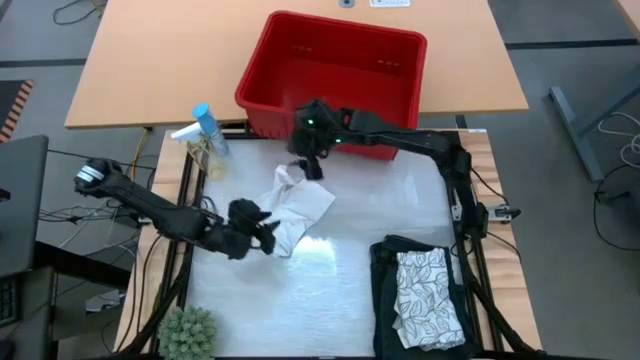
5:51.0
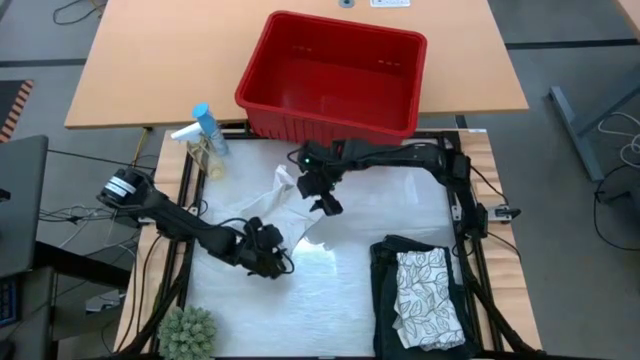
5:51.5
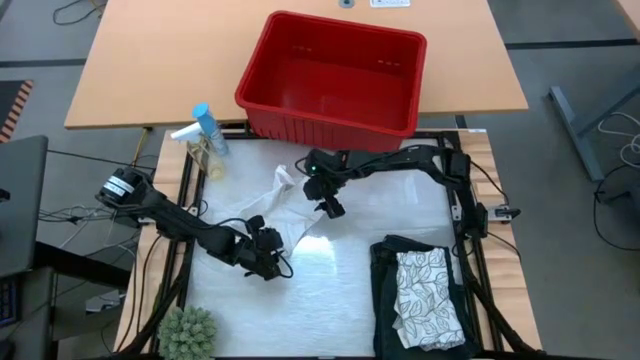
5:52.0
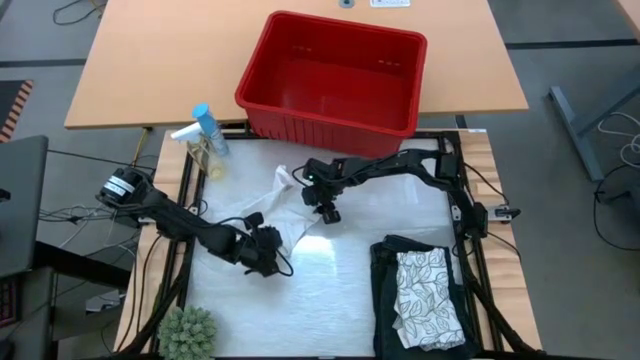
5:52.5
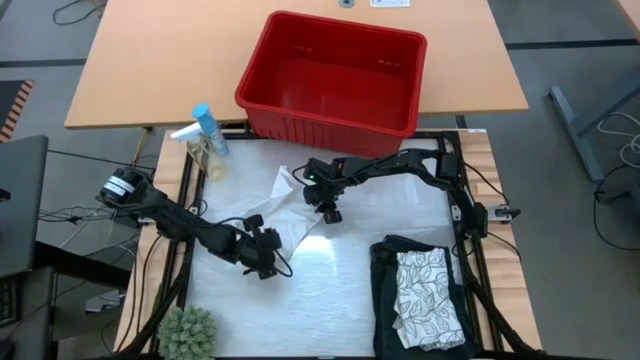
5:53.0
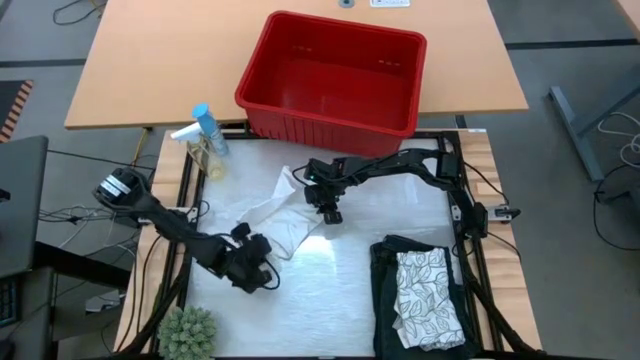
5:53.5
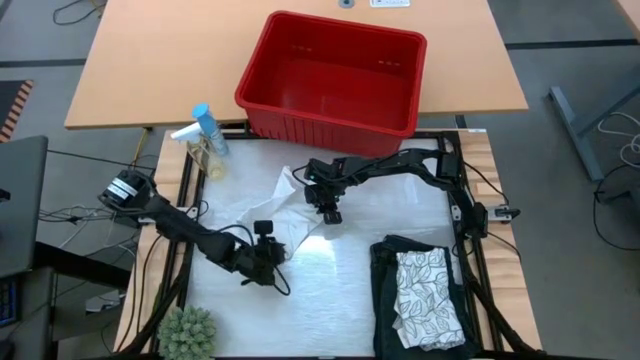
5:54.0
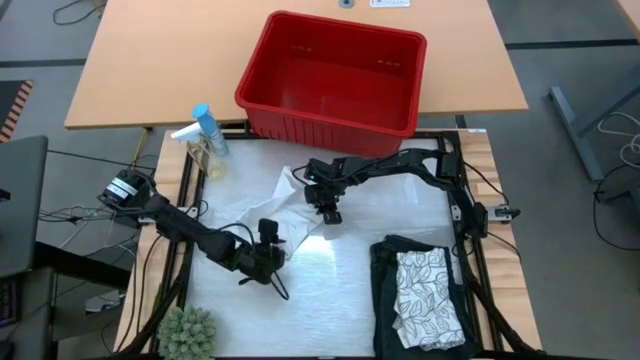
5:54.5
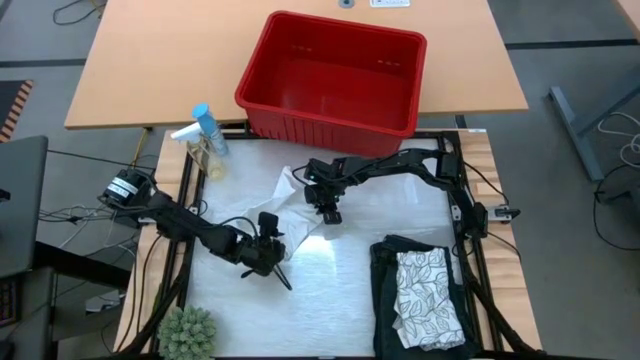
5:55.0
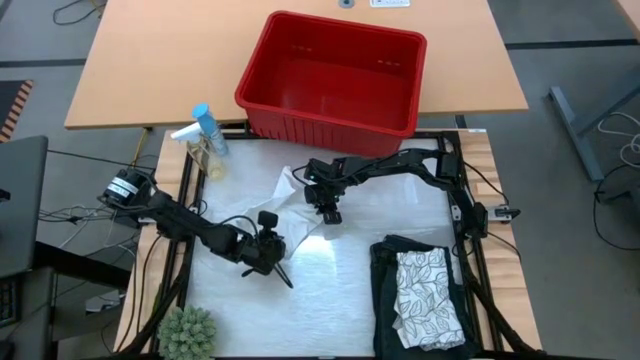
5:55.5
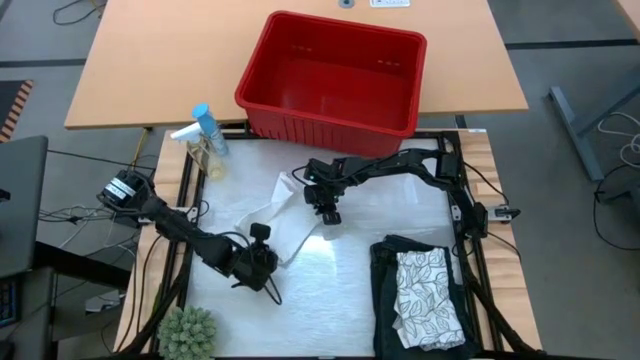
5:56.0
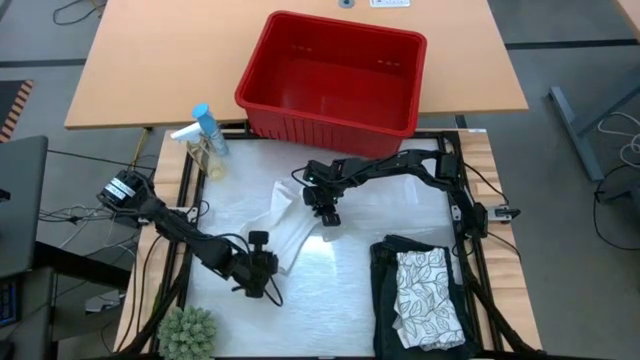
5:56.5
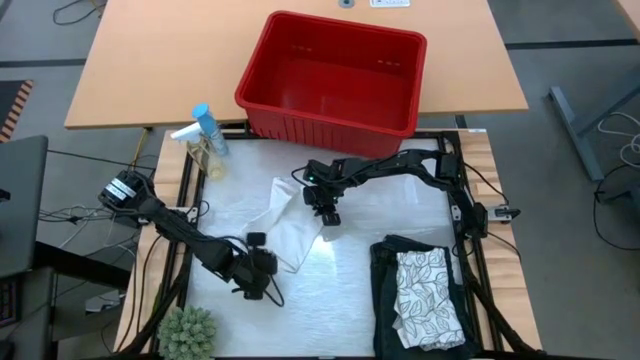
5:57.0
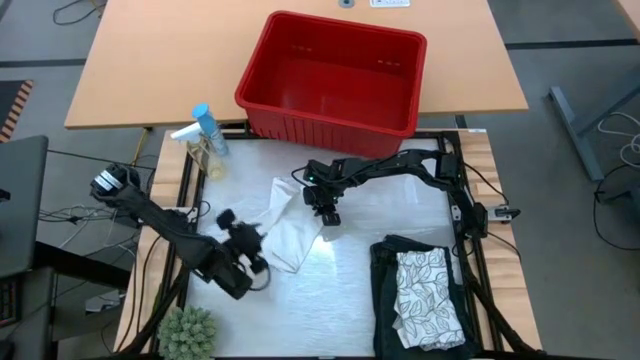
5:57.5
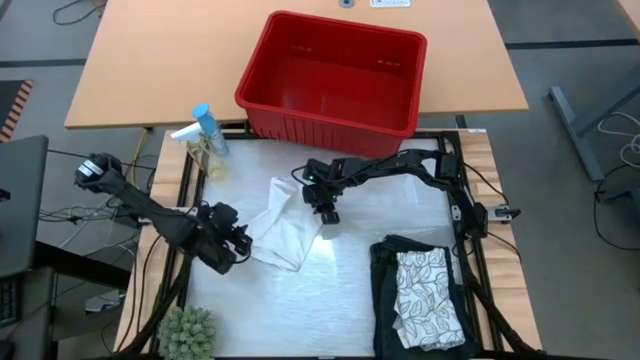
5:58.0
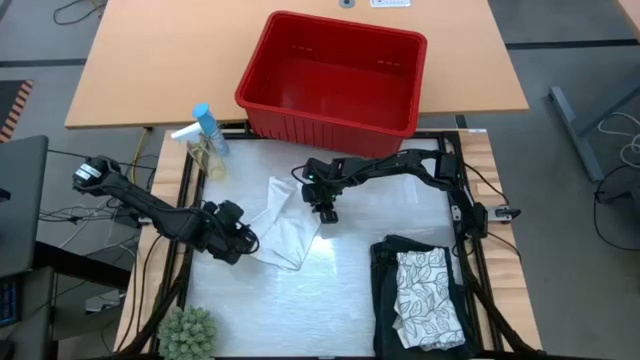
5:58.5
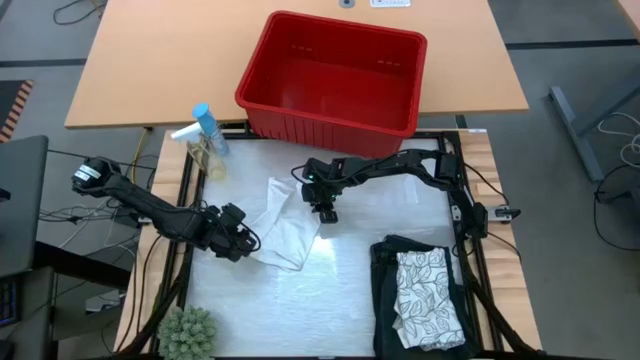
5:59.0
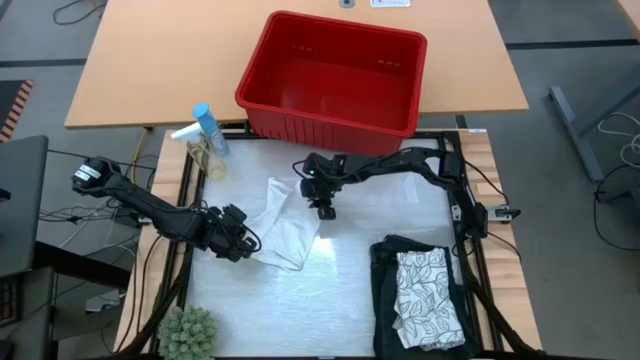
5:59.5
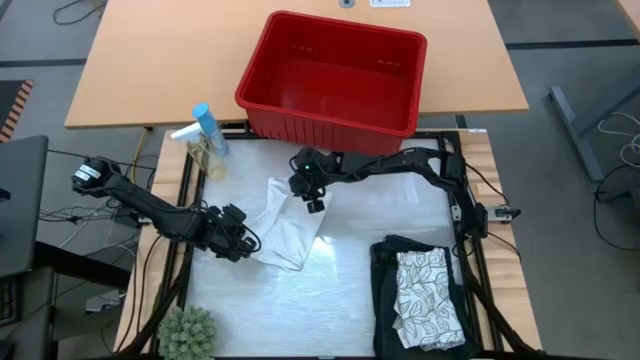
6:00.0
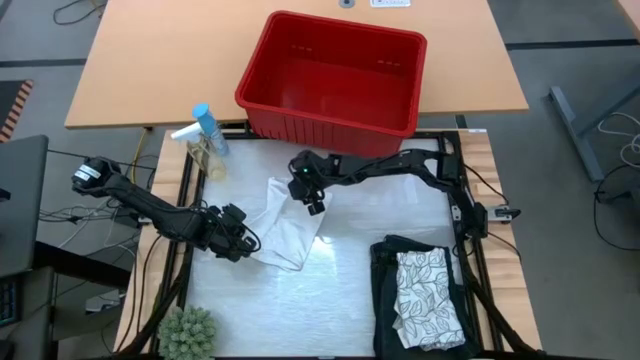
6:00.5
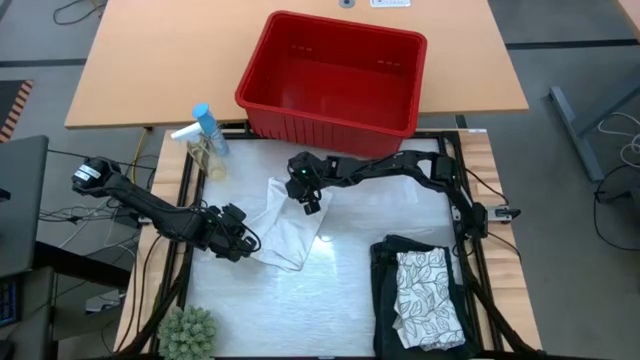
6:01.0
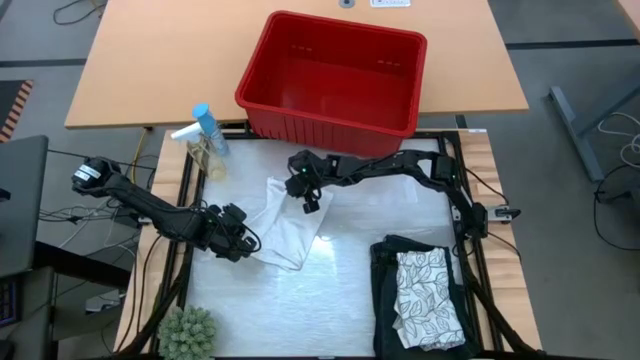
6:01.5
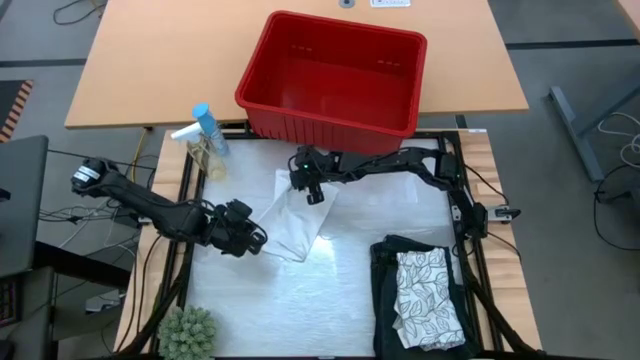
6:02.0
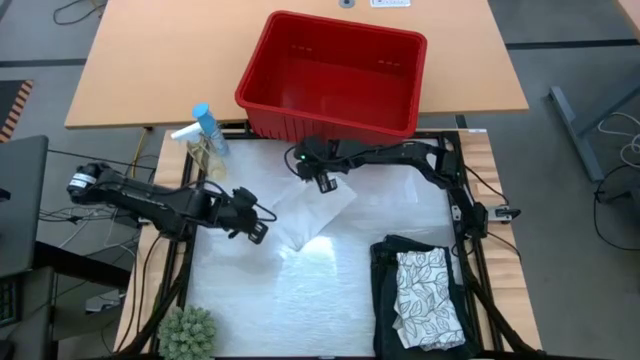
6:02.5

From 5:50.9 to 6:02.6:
Task: Fold Laundry from Bin
Fold the white boxer from the red laundry bin

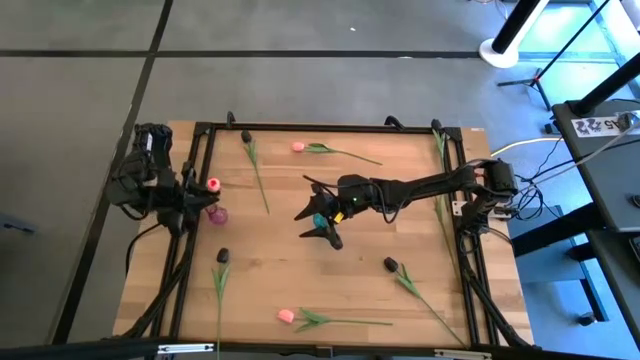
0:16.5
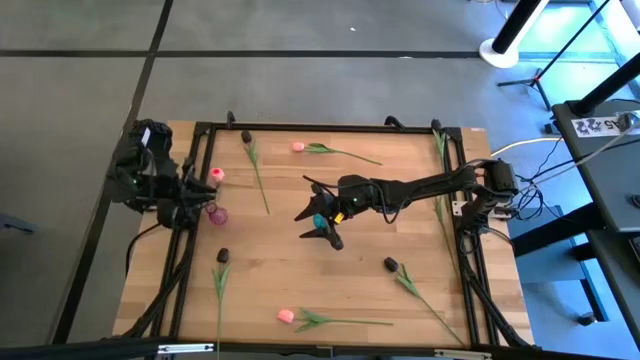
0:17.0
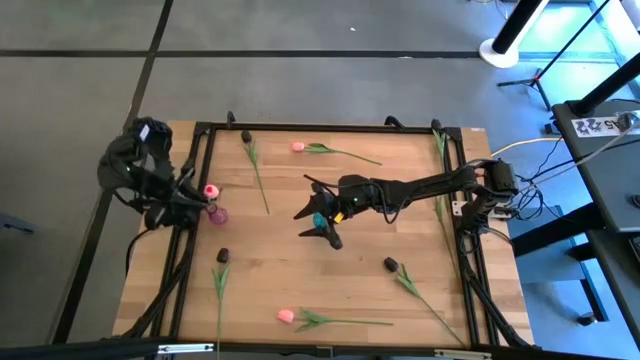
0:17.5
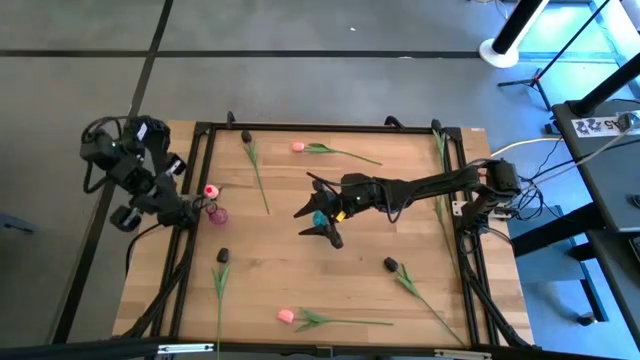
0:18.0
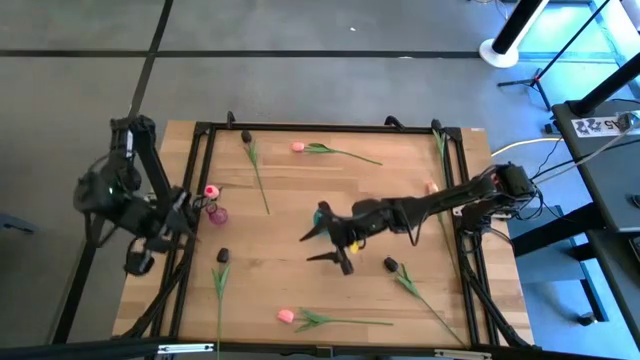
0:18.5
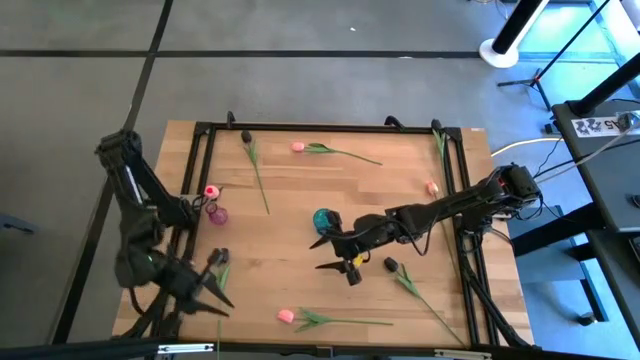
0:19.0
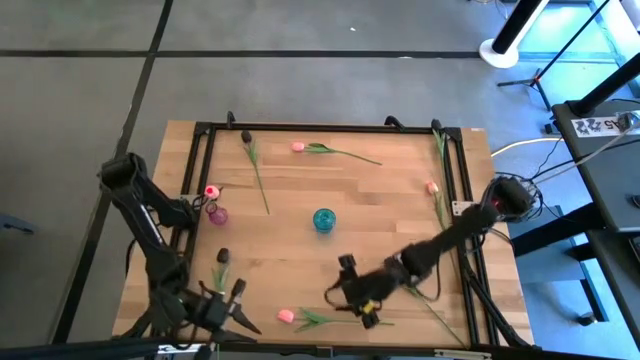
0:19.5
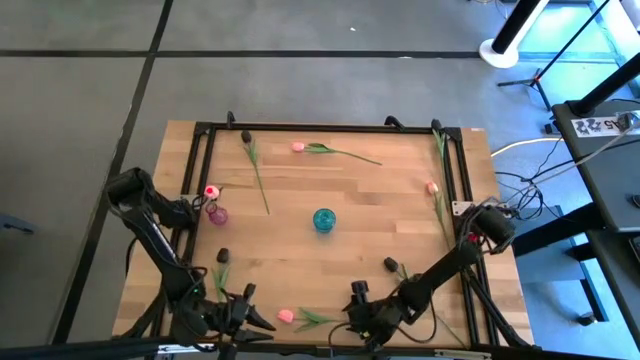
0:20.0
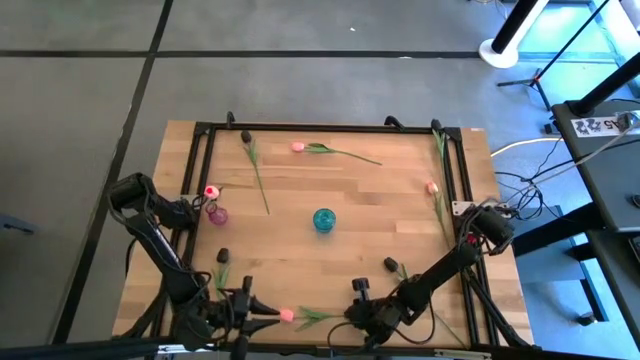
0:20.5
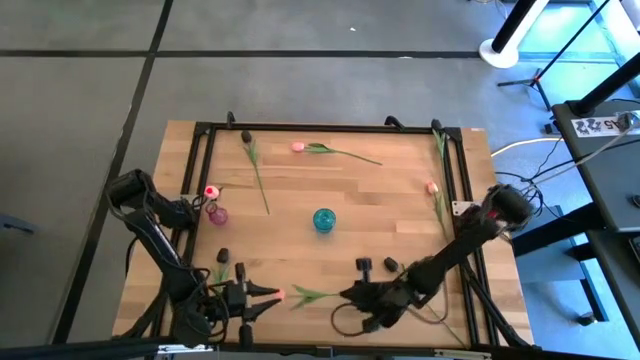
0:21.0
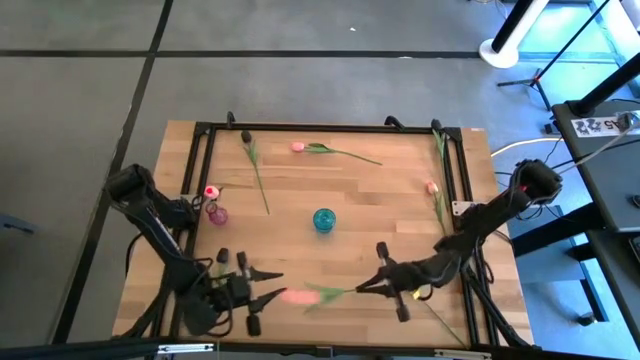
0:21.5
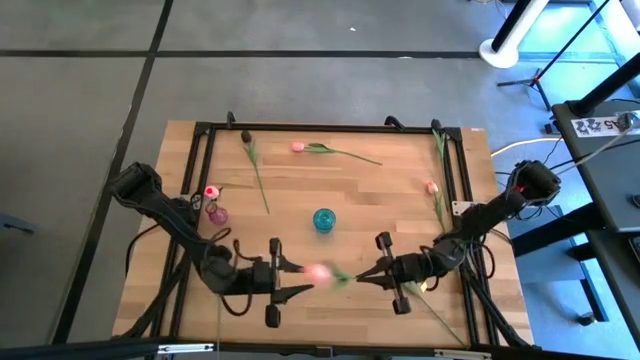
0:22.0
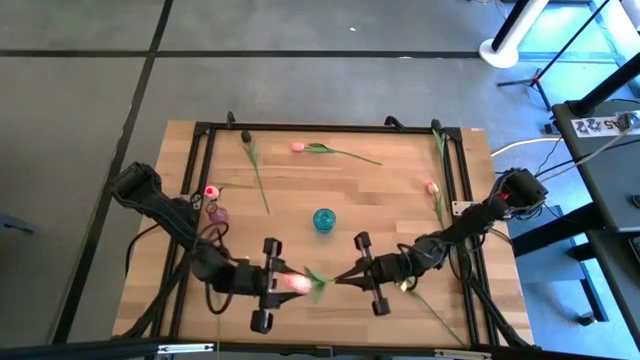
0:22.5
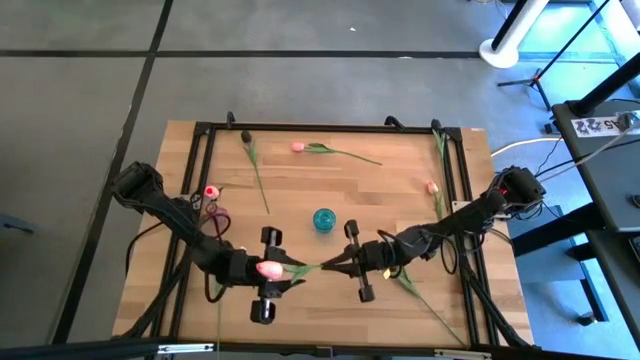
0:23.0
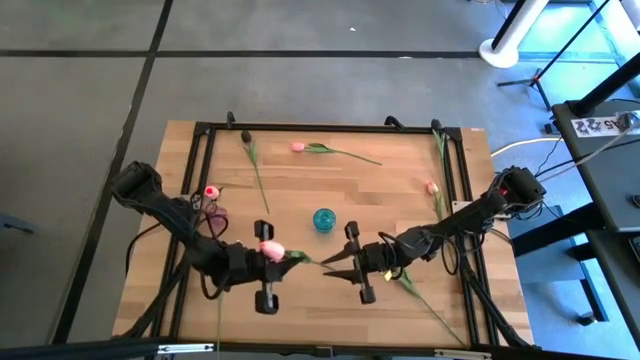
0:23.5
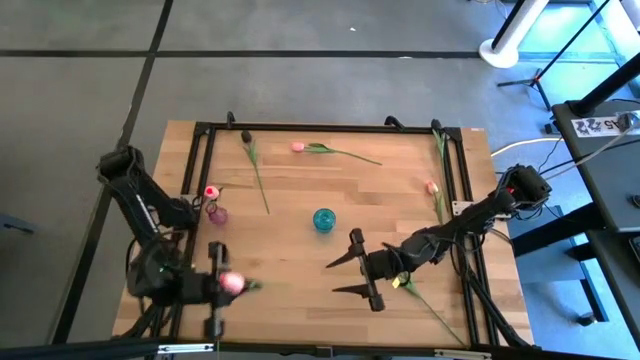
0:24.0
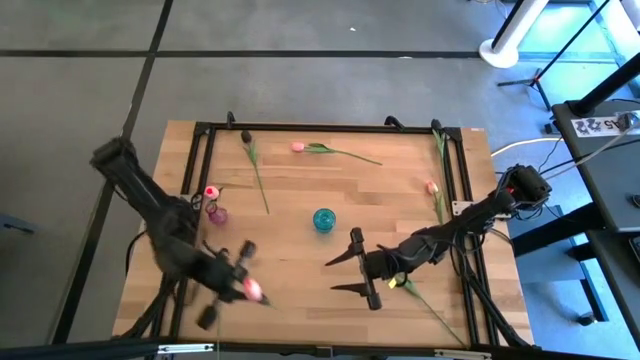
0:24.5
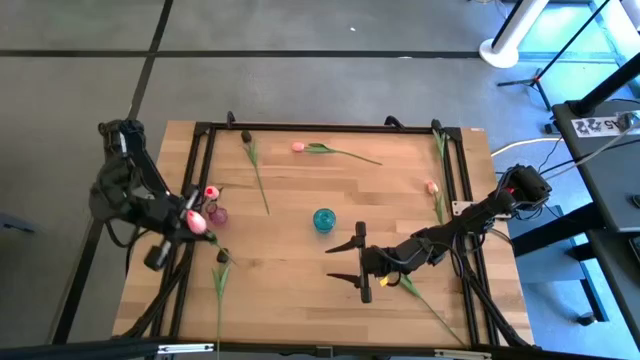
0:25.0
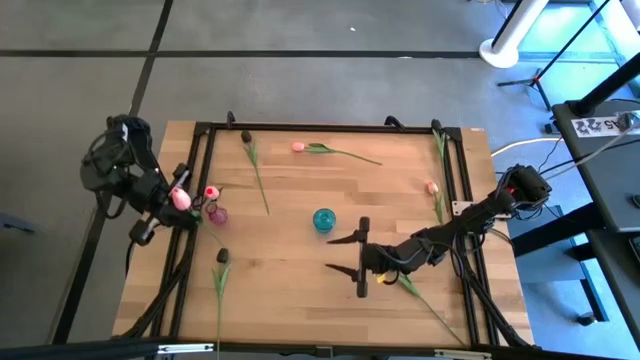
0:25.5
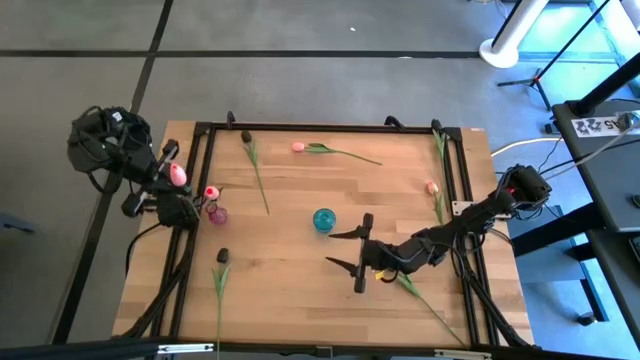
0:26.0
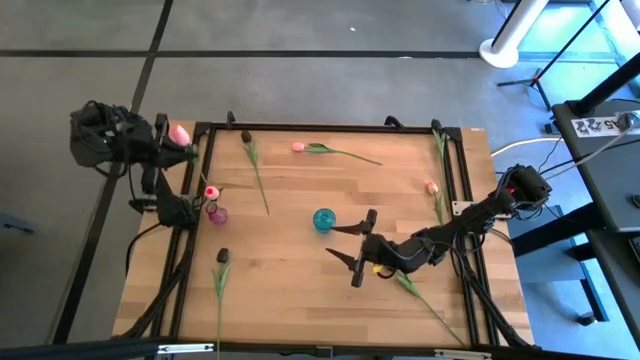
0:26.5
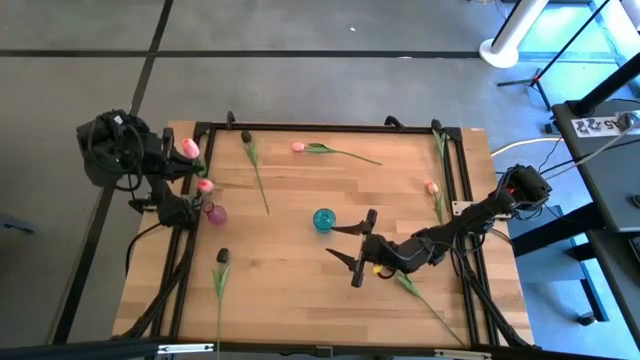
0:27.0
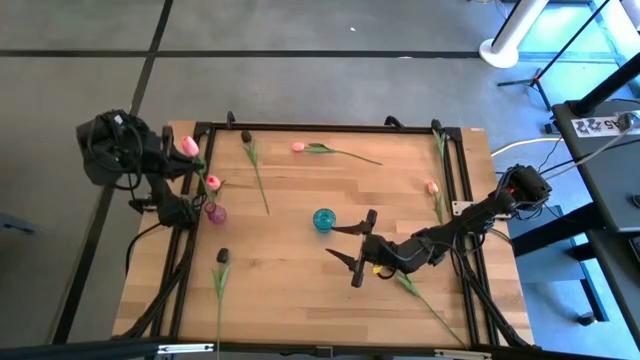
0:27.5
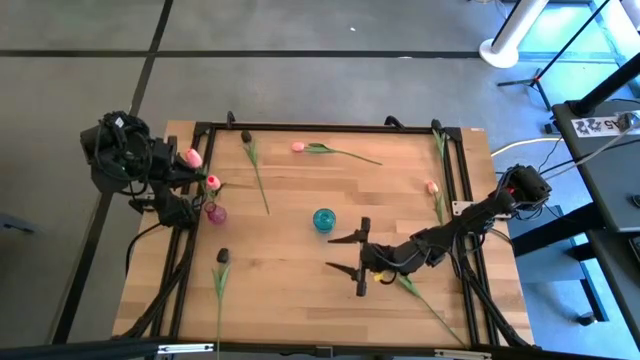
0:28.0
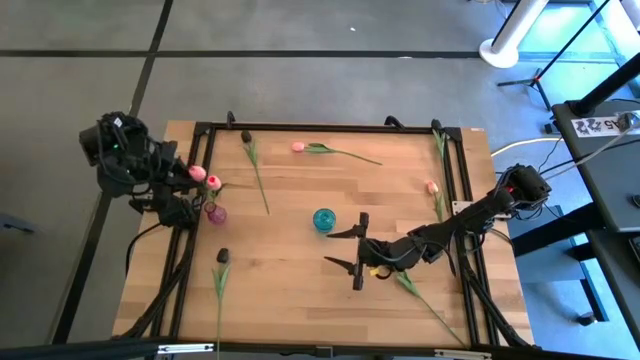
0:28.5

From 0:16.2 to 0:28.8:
Task: Sort flowers into vase by color
Put the bottom pink tulip into the purple vase
